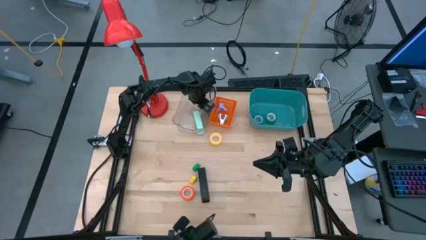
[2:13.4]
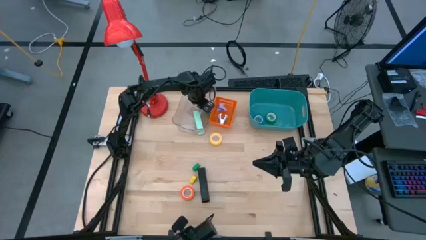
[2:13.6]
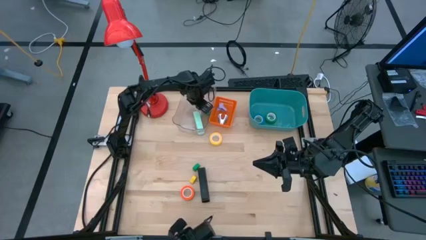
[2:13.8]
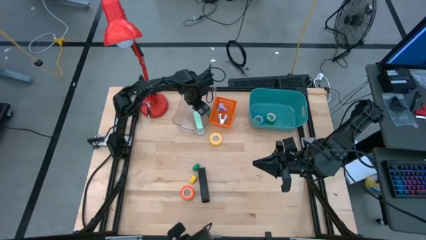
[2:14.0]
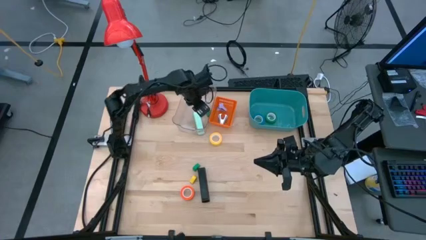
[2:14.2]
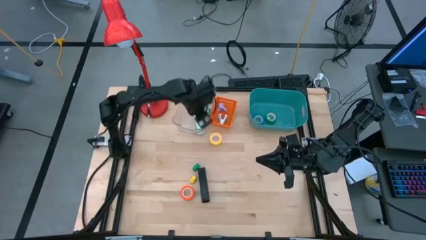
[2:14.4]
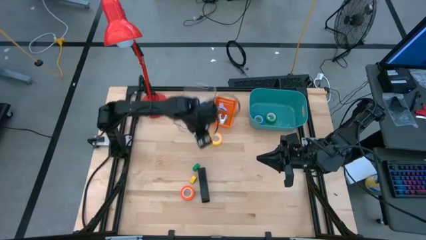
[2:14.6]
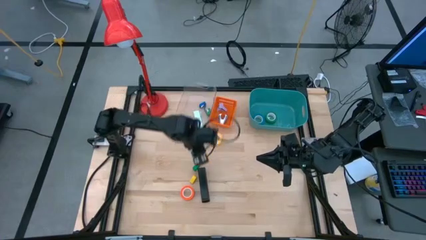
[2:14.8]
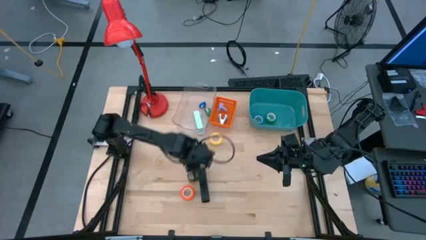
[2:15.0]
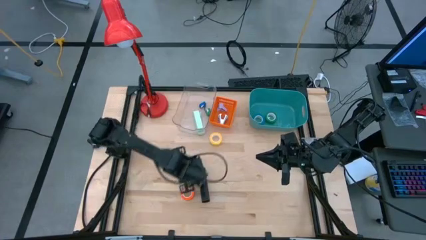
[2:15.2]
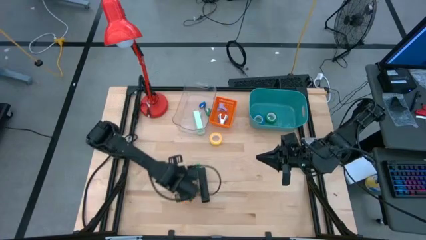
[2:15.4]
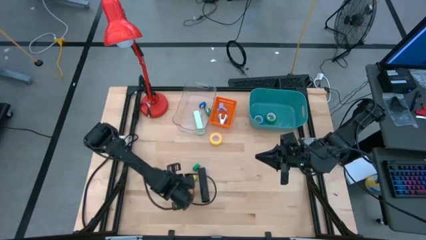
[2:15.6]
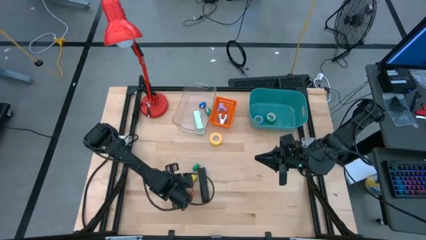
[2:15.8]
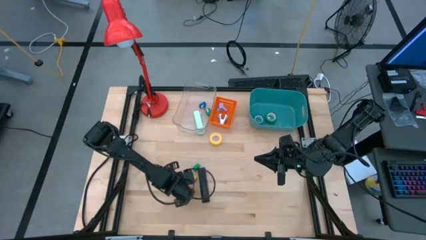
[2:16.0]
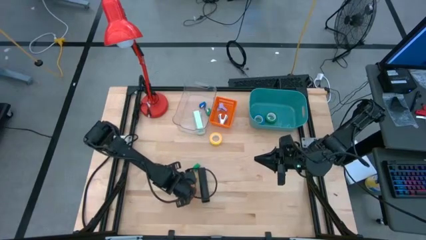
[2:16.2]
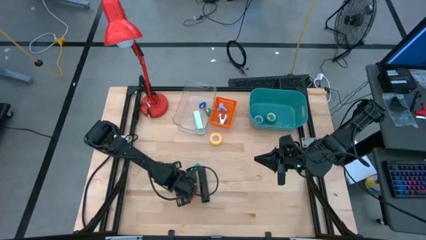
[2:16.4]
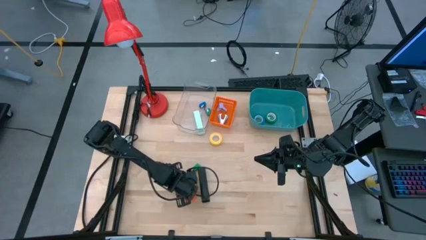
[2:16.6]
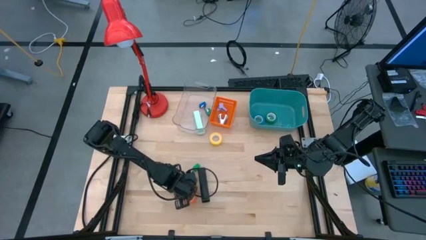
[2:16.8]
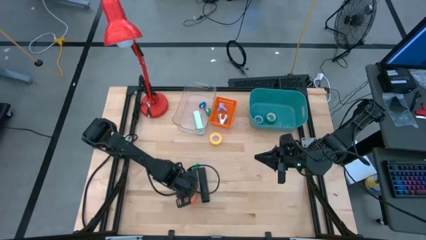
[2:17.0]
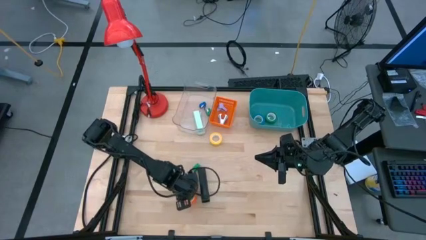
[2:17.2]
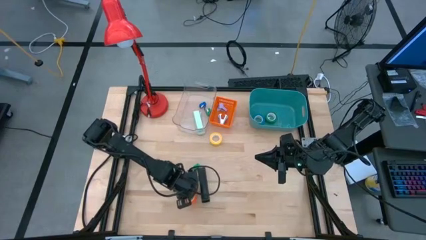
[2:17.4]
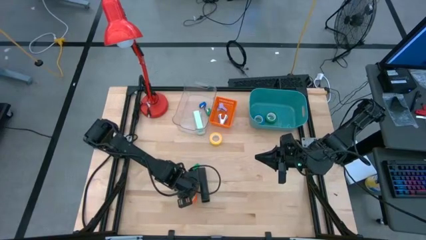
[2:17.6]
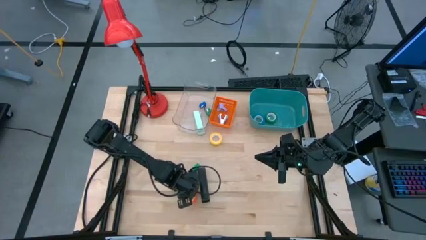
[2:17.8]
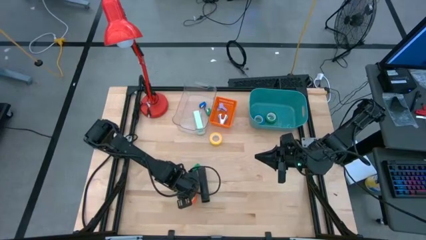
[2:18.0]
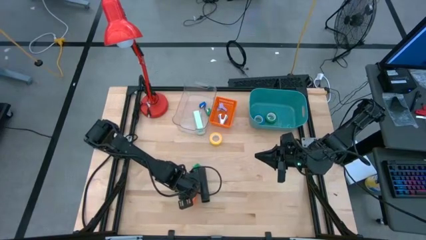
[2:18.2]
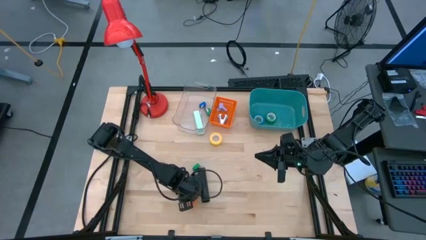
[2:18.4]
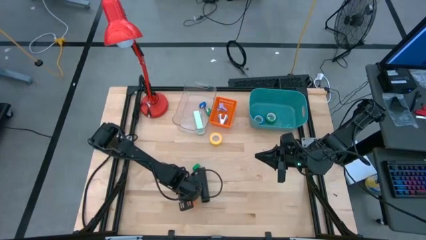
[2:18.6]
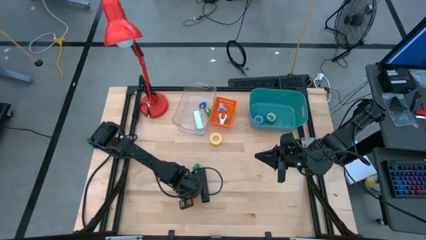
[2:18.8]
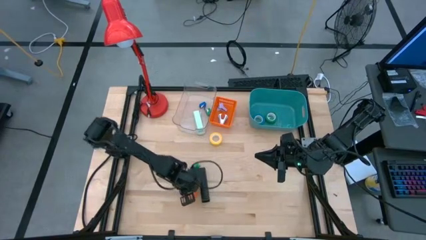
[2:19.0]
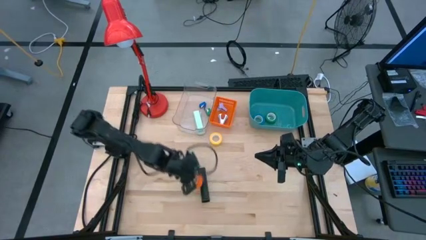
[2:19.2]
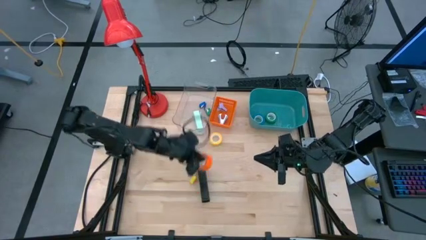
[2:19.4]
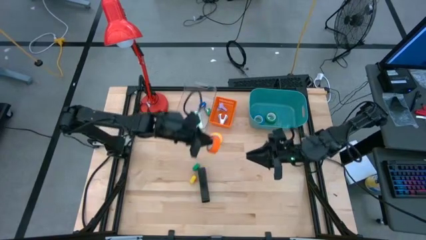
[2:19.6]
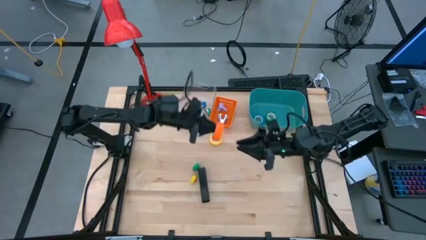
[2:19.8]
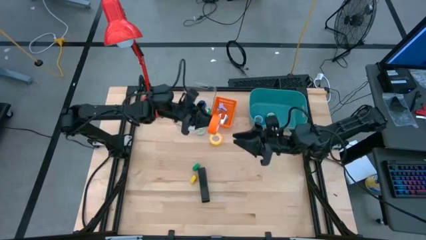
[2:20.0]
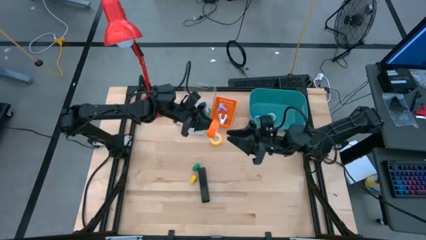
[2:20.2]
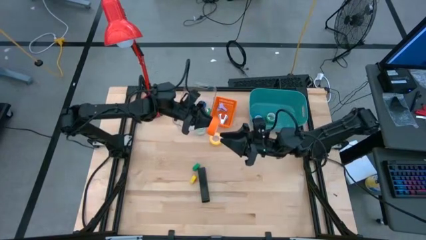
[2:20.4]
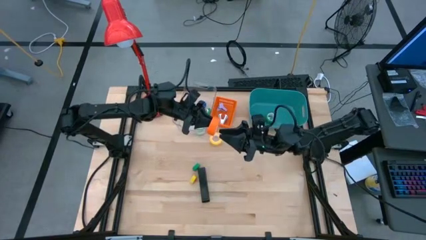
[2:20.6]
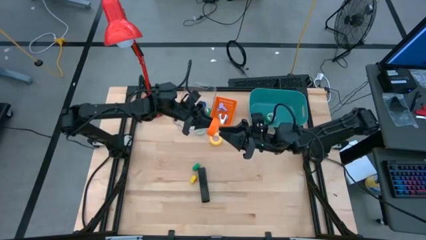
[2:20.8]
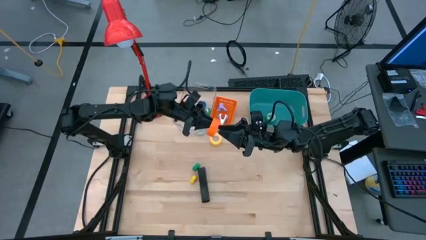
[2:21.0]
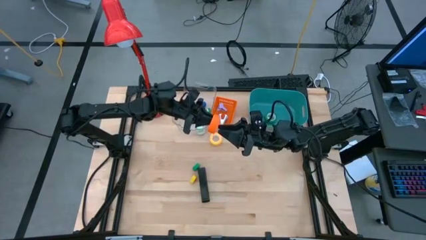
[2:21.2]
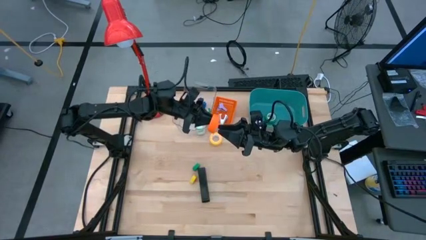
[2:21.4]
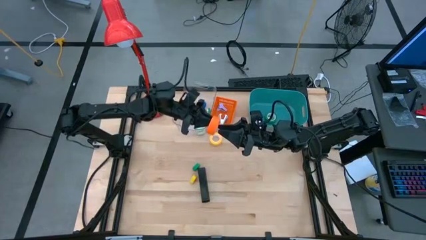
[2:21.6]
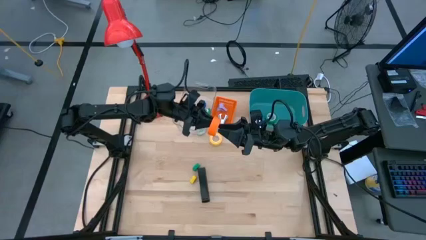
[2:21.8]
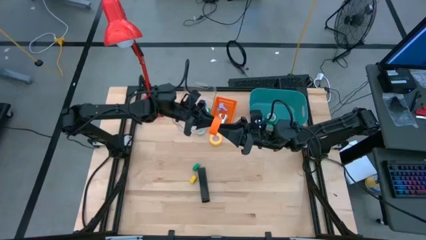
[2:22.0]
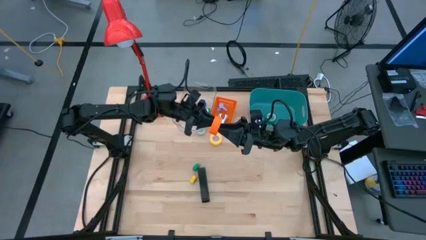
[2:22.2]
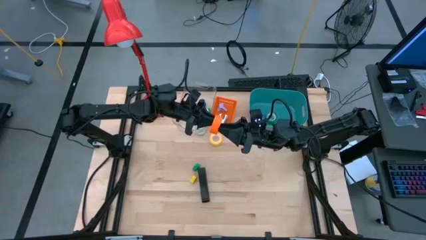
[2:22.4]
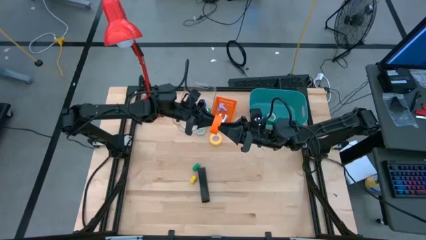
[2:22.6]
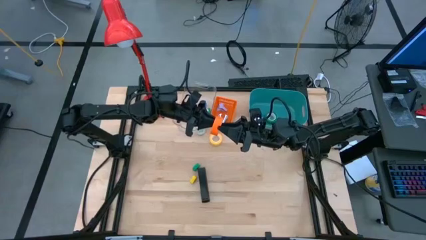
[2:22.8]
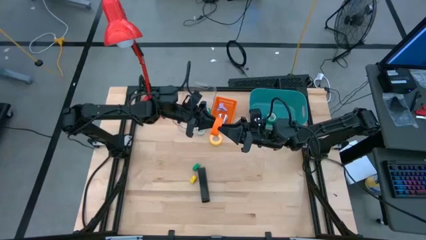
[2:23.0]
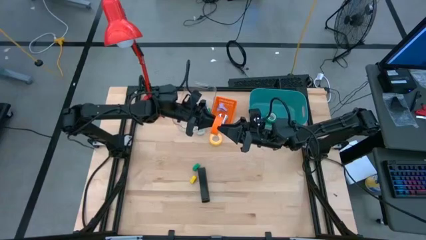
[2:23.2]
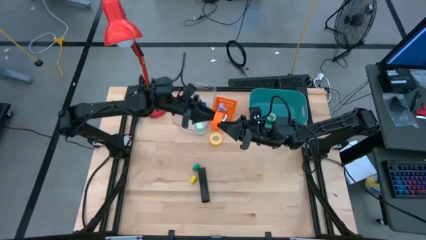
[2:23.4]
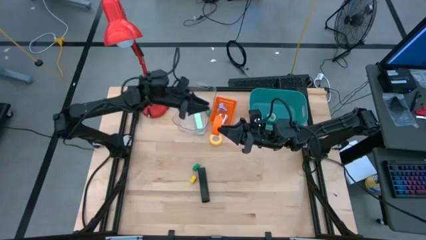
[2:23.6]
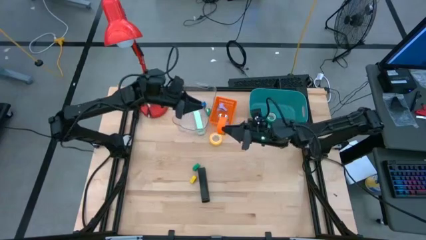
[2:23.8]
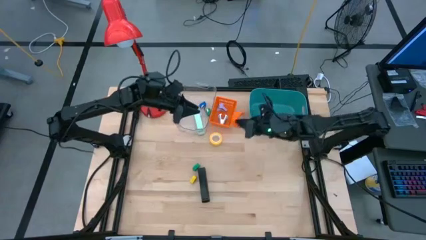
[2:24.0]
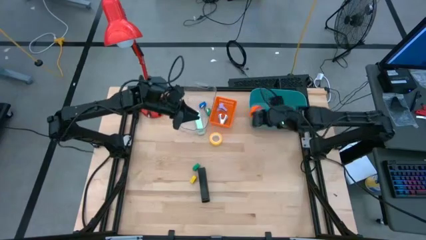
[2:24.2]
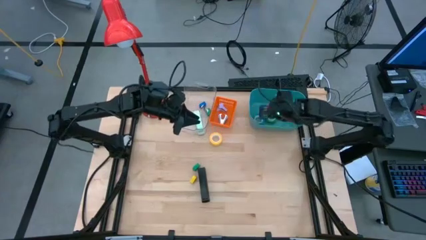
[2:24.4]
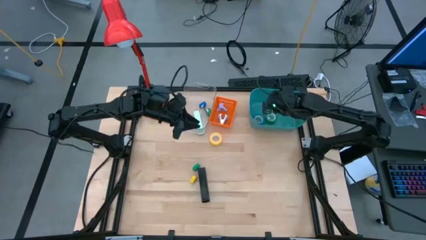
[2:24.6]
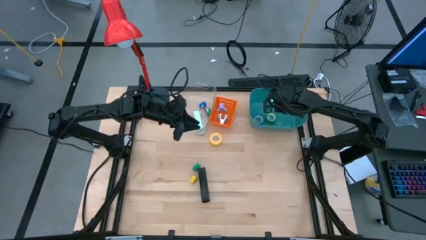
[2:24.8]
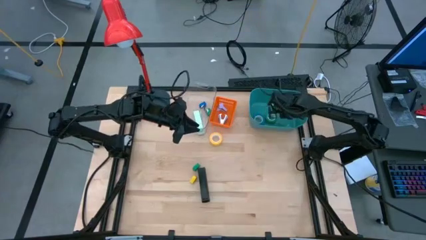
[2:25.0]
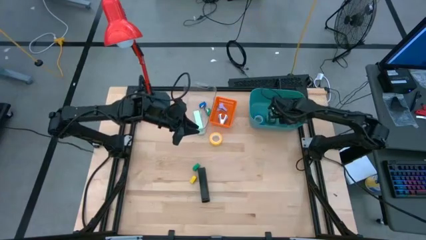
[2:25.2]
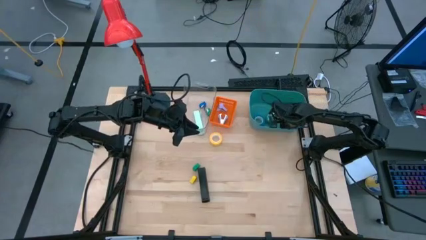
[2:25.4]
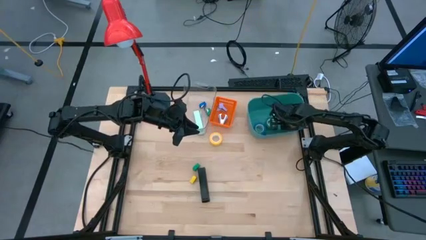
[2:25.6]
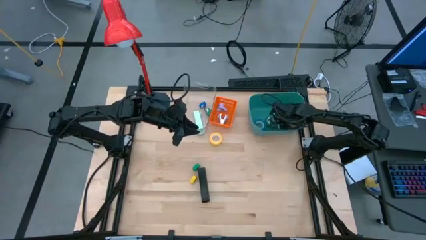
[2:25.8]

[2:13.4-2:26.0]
Task: Pick and place Stapler, Stapler remover, tape
Put the orange tape into the green bin

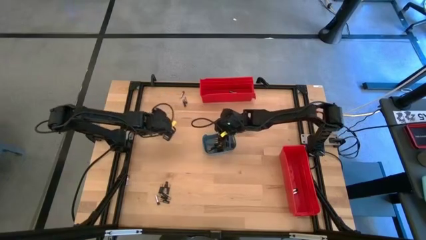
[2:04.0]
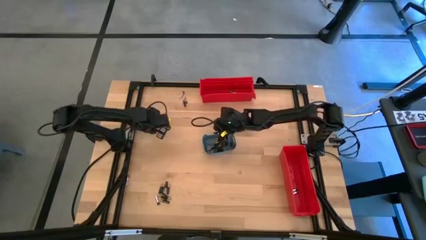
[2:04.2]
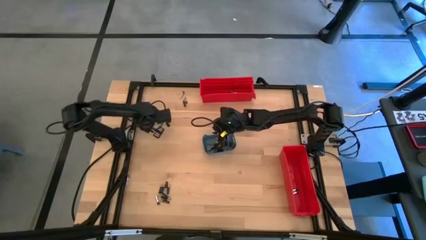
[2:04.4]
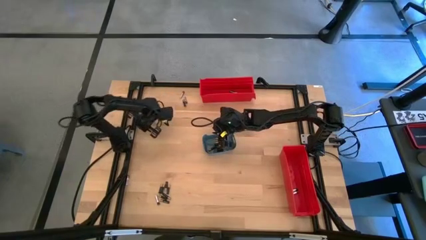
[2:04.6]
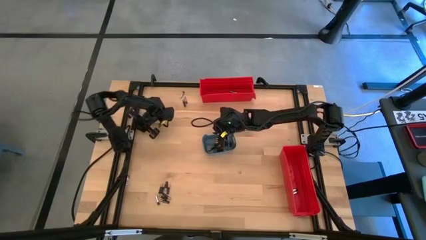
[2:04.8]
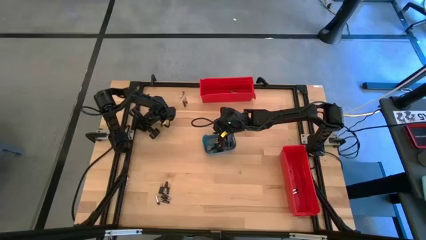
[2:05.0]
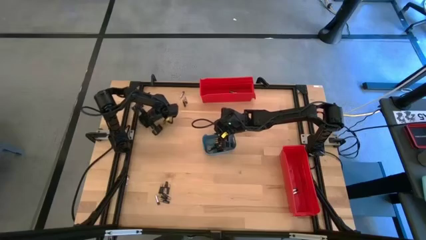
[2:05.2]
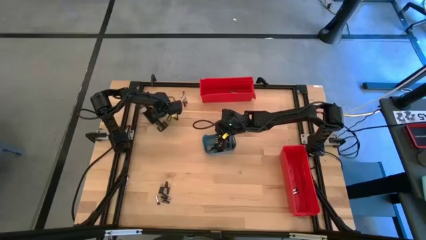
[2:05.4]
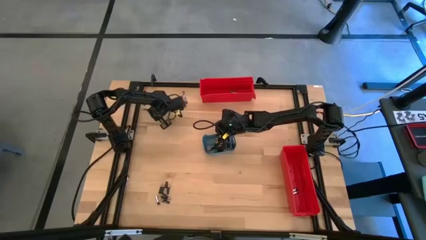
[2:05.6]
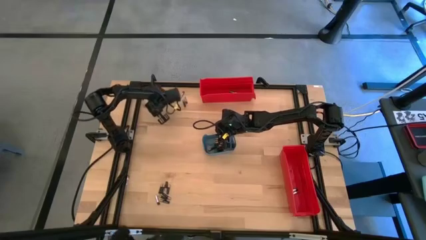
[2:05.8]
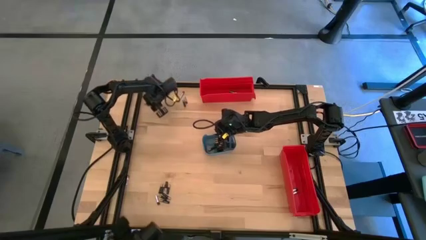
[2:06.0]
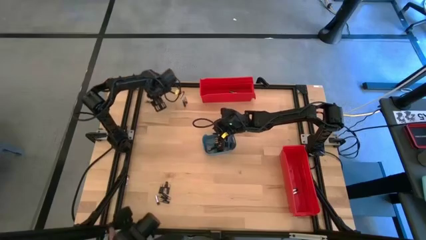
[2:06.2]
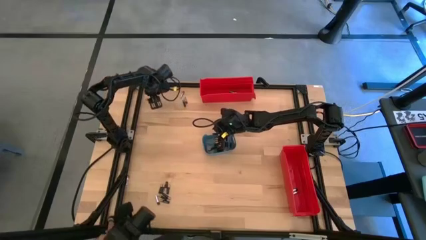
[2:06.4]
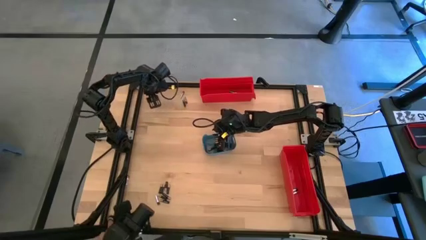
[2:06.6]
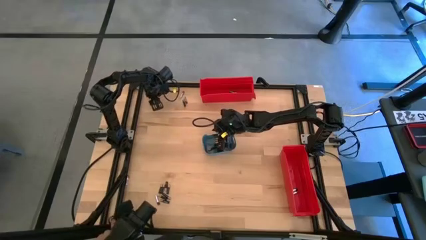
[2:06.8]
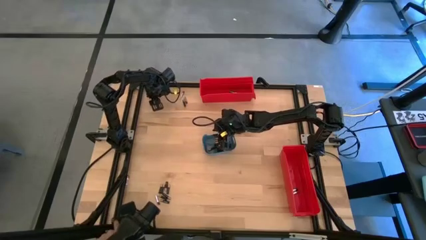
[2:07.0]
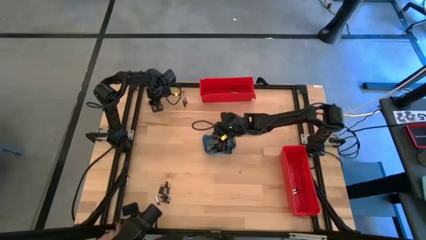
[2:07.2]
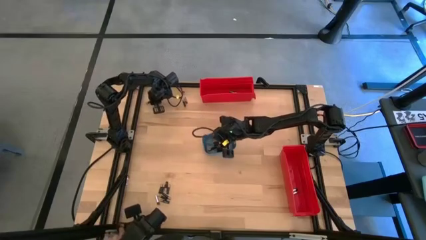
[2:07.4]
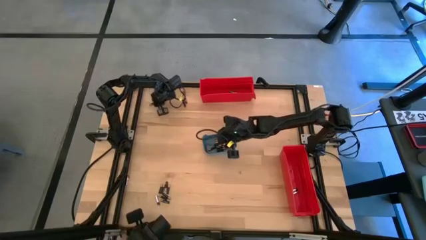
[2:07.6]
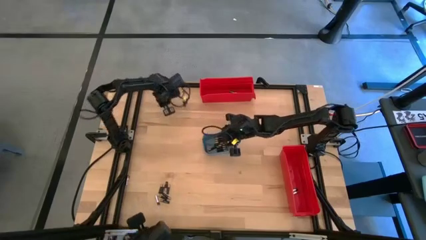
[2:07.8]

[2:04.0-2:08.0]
Task: Sort batteries
Put the black battery into the blue bin
